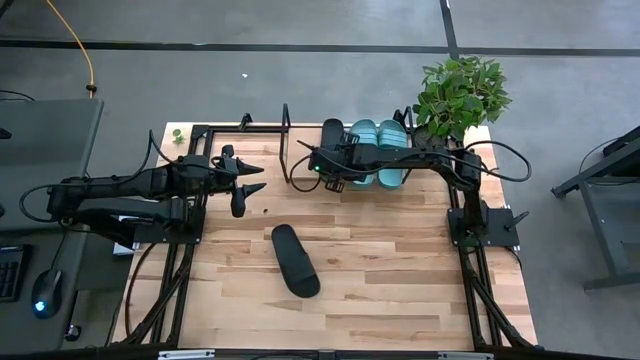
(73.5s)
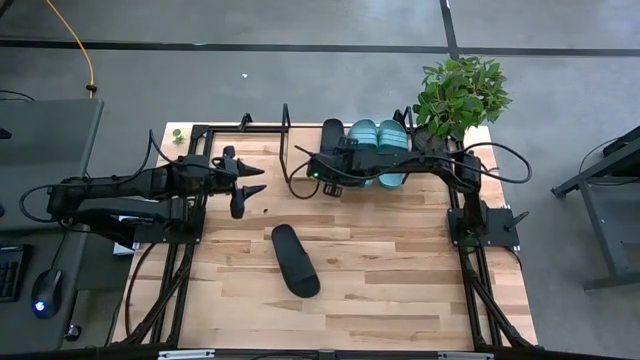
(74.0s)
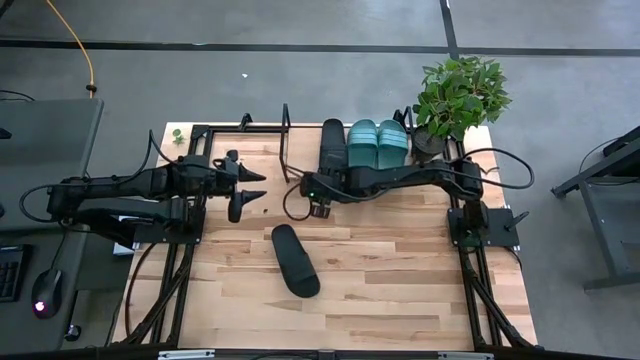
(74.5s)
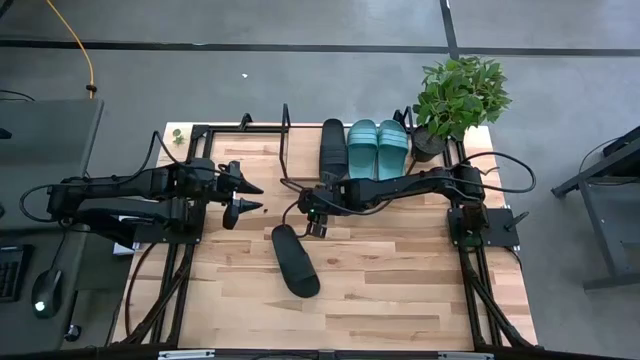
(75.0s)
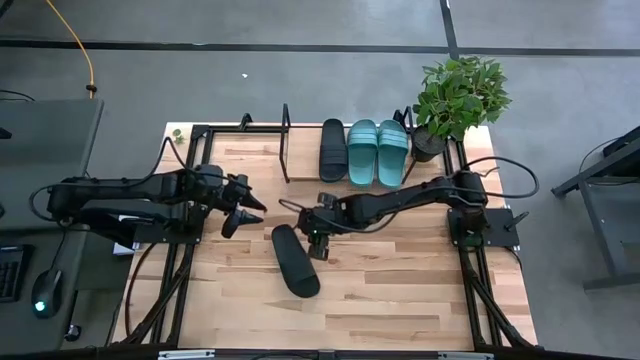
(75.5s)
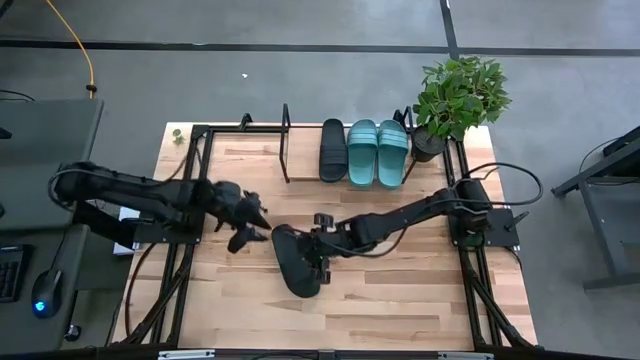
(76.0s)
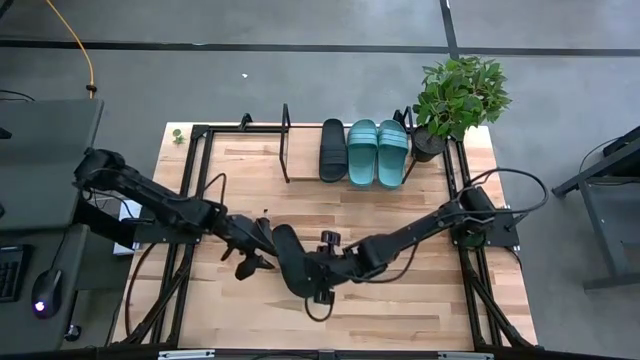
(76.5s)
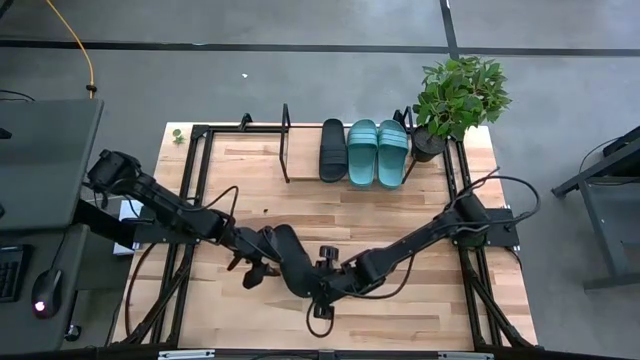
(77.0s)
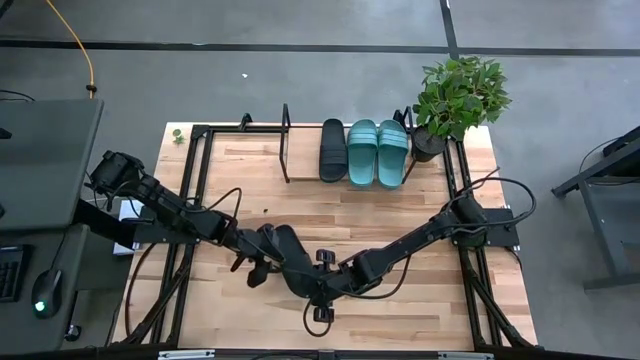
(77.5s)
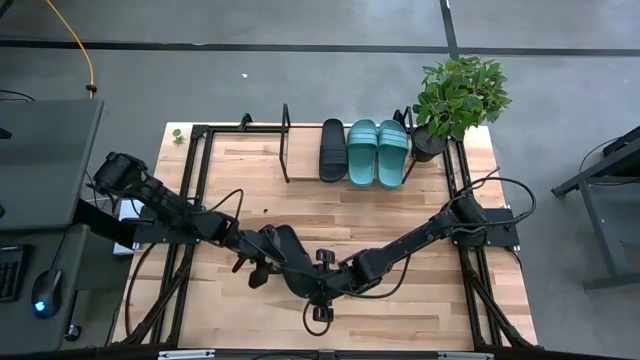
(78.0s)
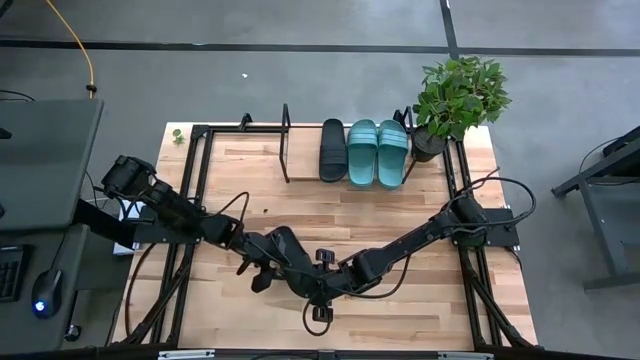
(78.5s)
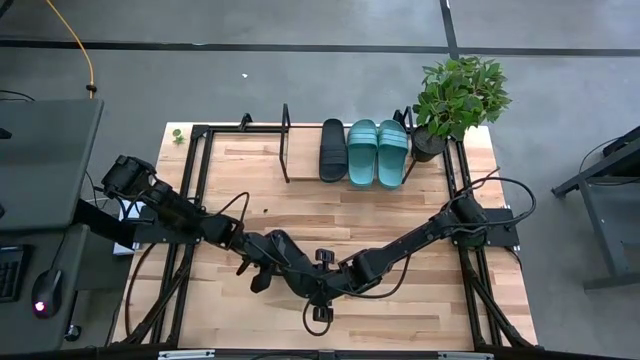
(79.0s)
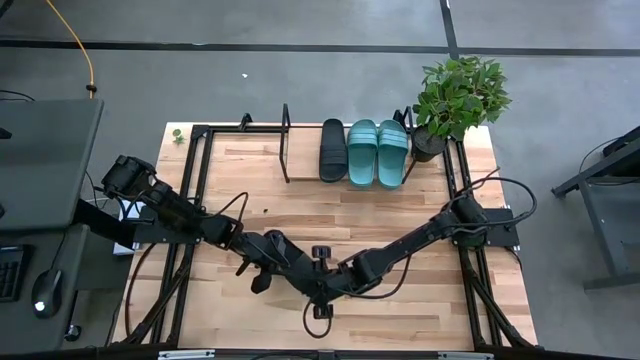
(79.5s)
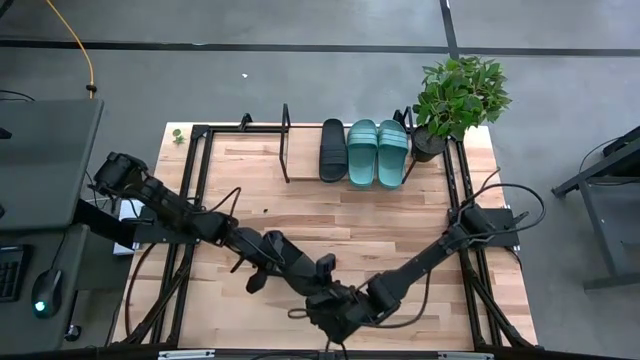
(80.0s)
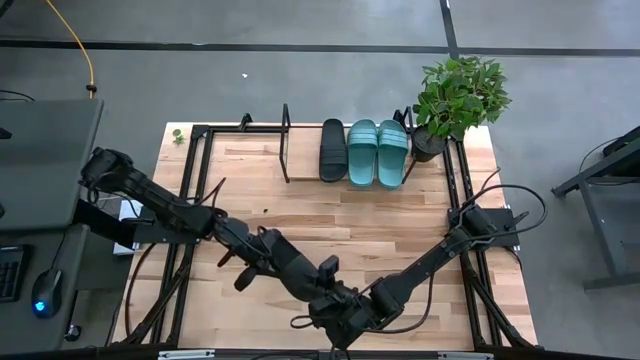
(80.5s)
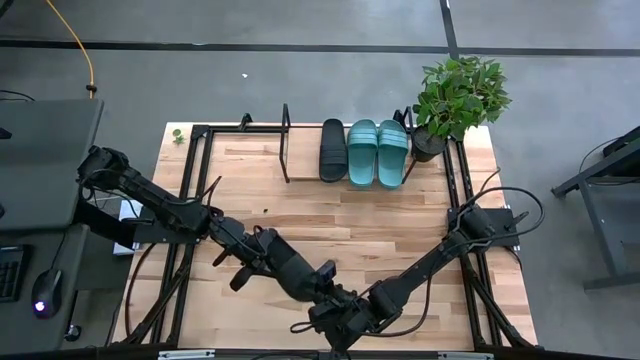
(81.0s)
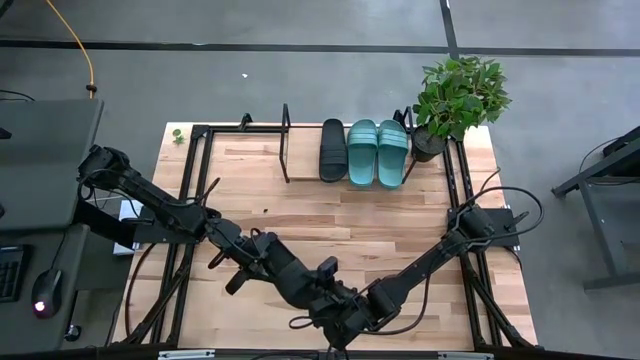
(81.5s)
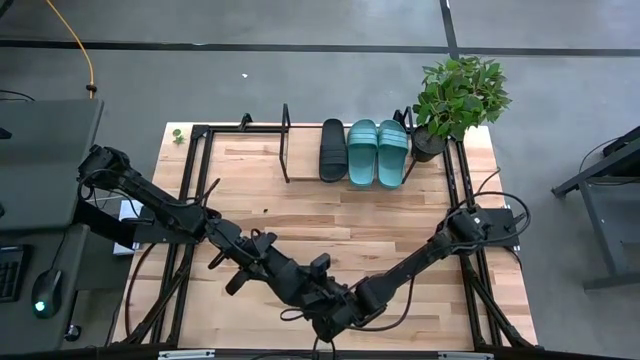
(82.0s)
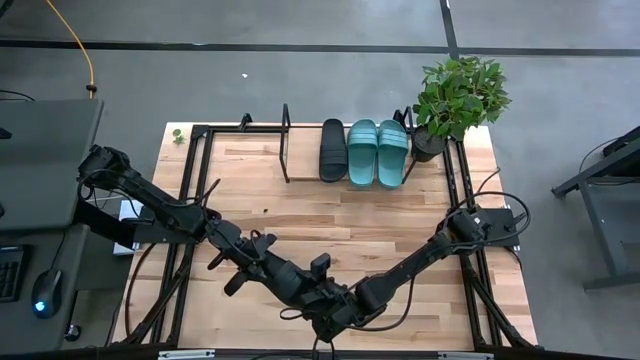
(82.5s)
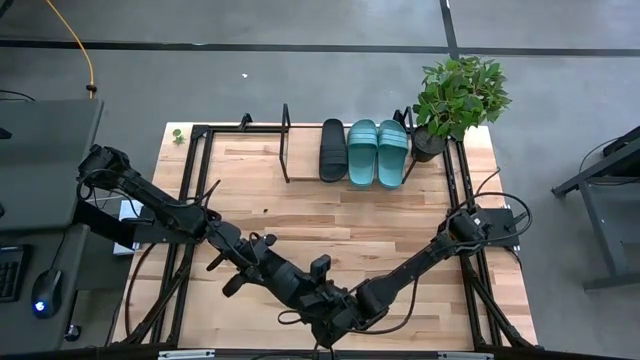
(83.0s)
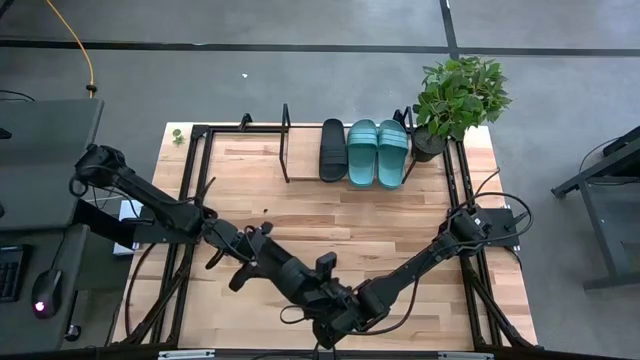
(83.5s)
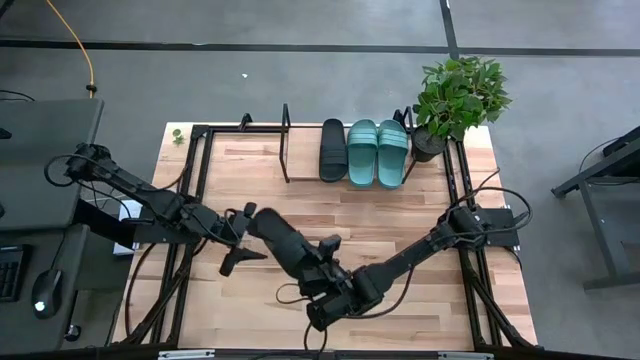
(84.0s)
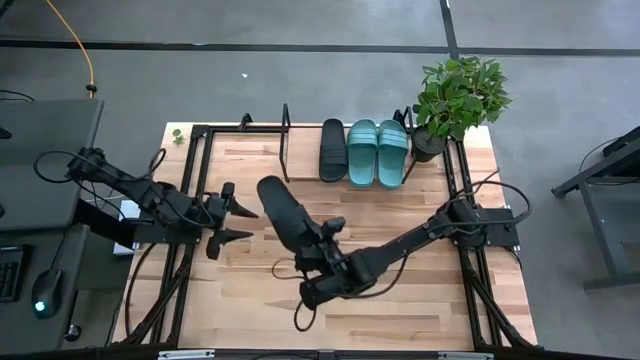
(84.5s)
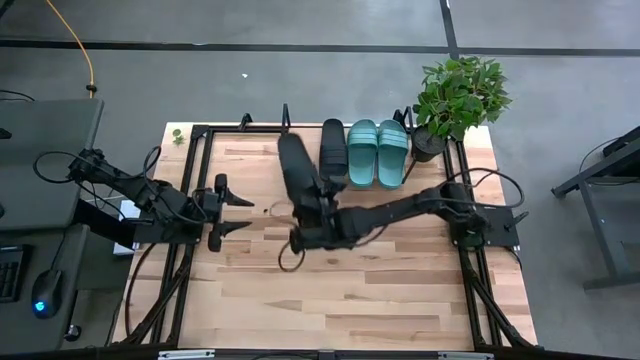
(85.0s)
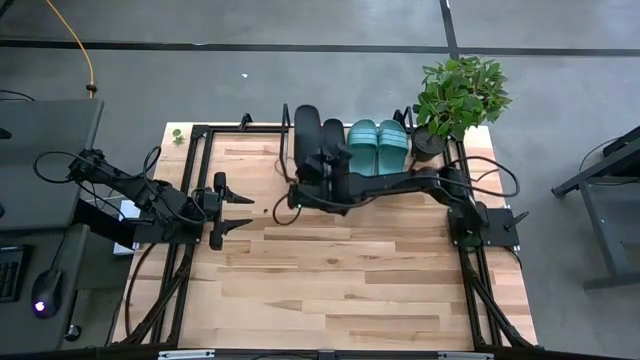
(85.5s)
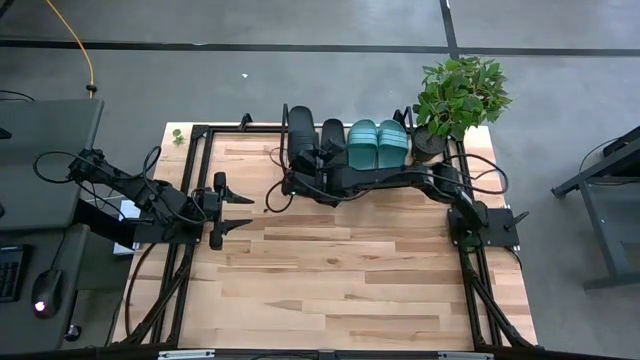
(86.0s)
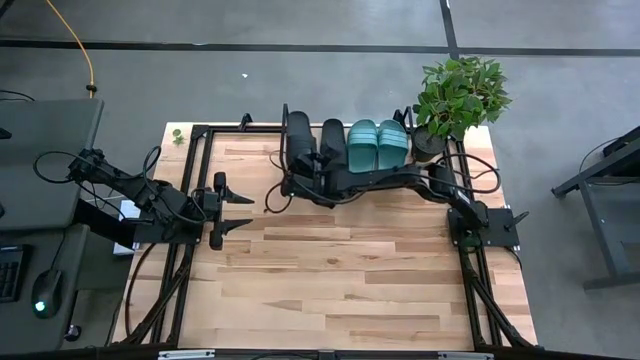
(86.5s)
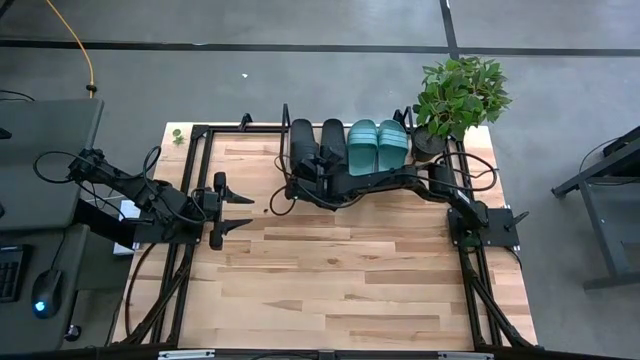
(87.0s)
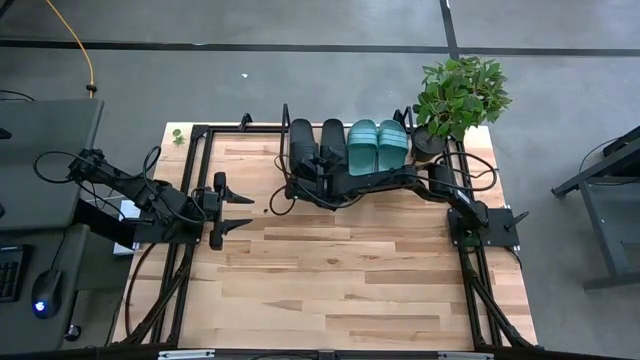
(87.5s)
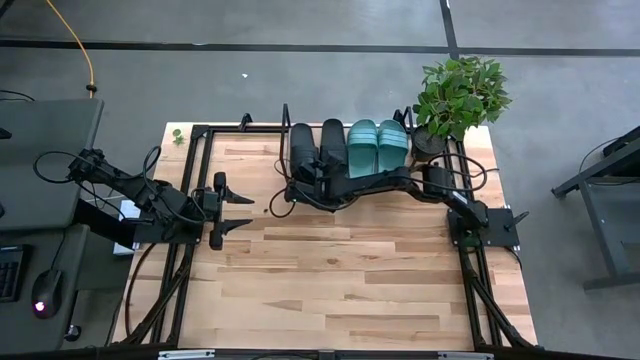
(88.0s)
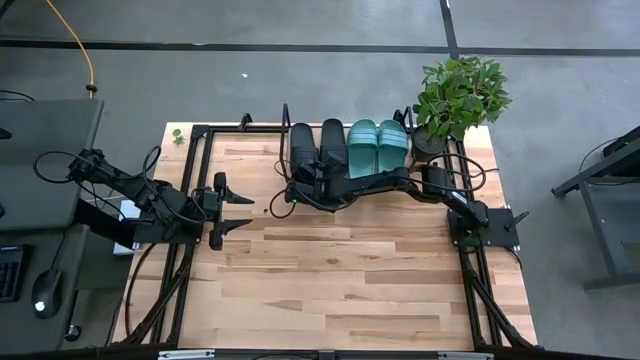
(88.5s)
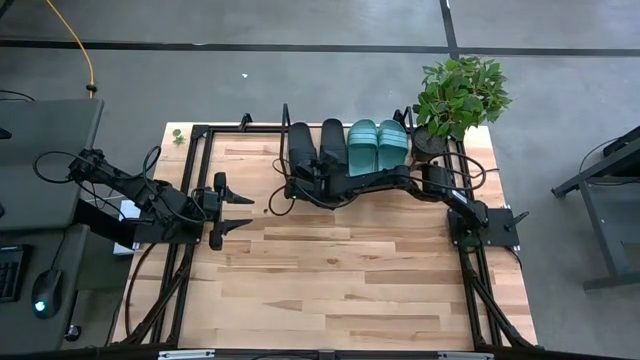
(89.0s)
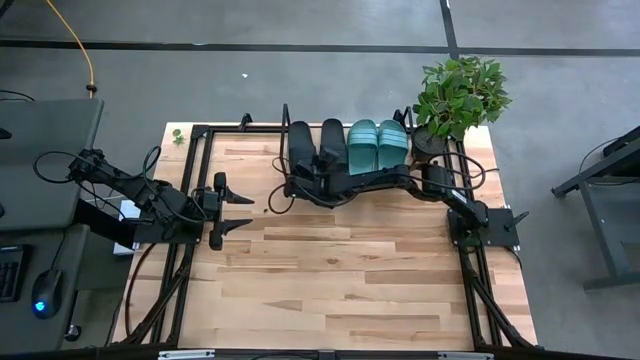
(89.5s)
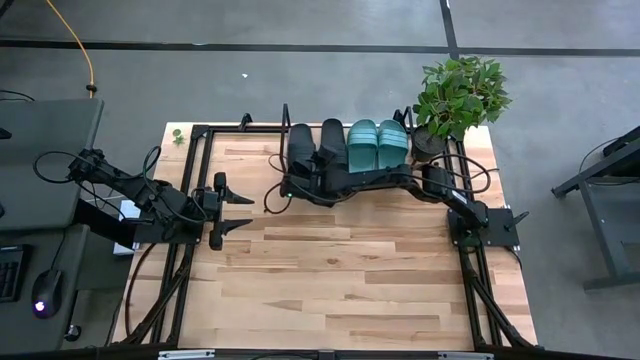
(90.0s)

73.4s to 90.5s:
Task: Pick and place slides into the shelf
Put the black slide on the shelf

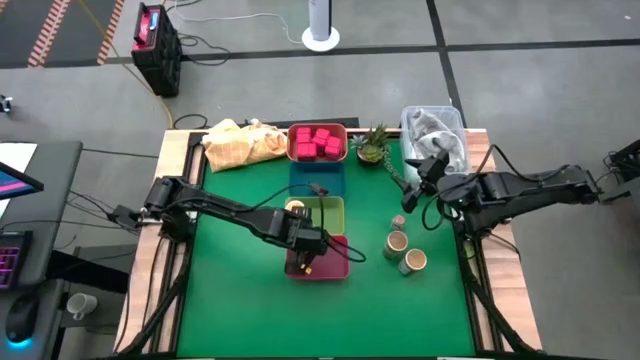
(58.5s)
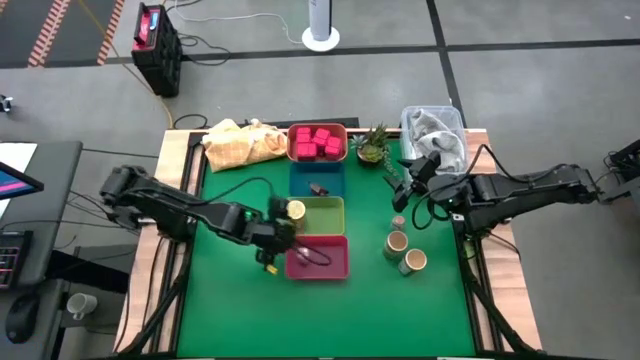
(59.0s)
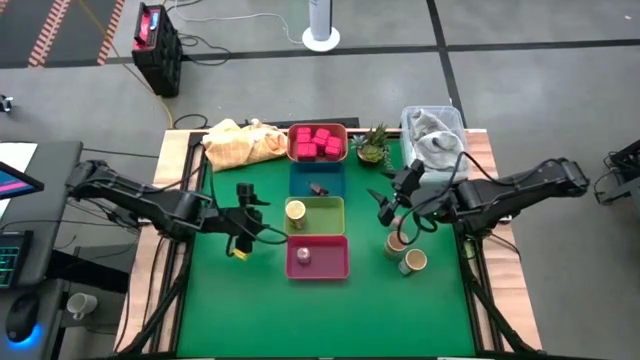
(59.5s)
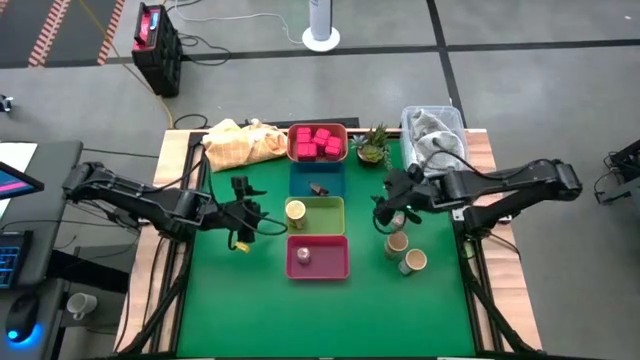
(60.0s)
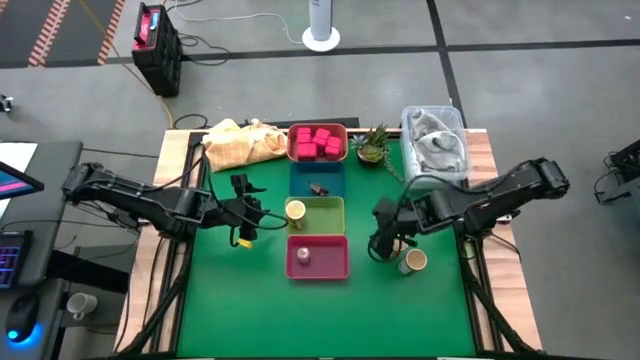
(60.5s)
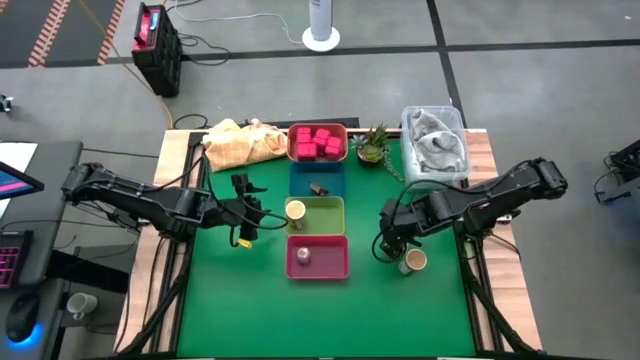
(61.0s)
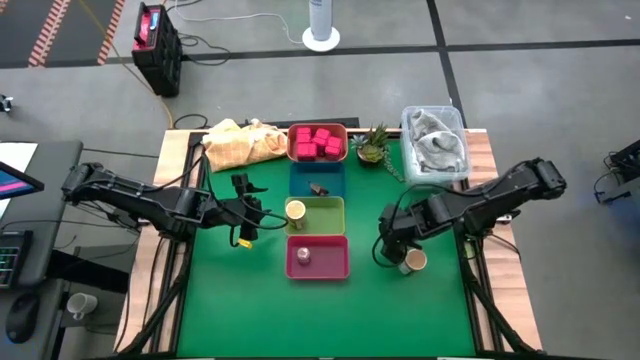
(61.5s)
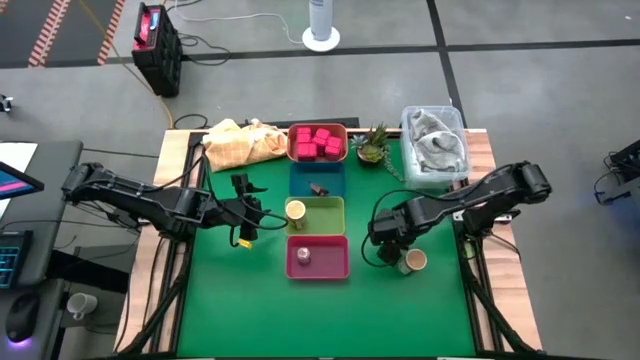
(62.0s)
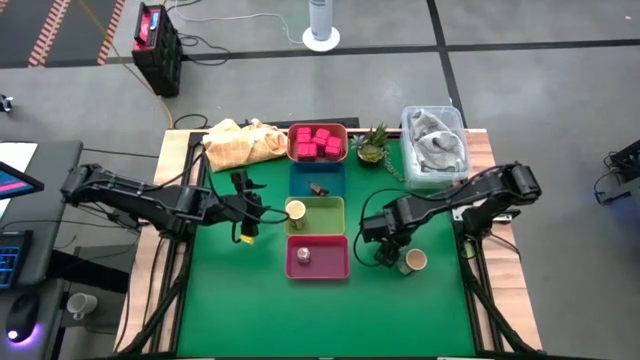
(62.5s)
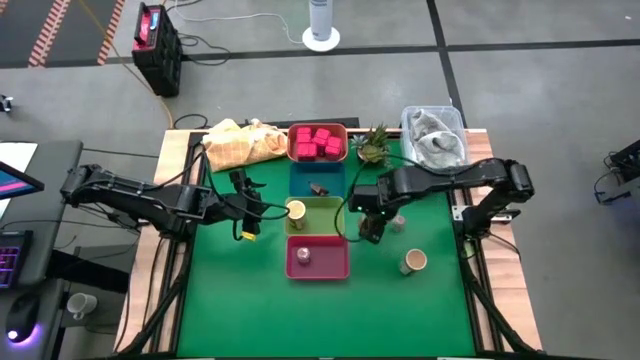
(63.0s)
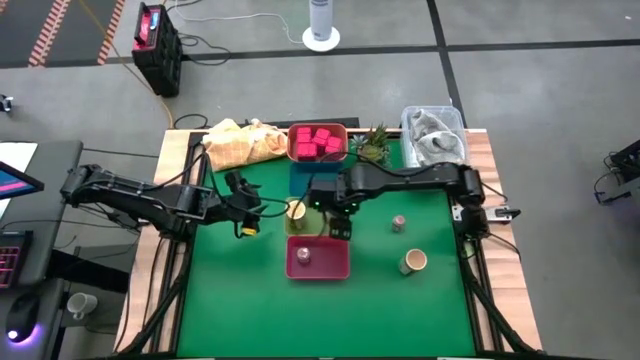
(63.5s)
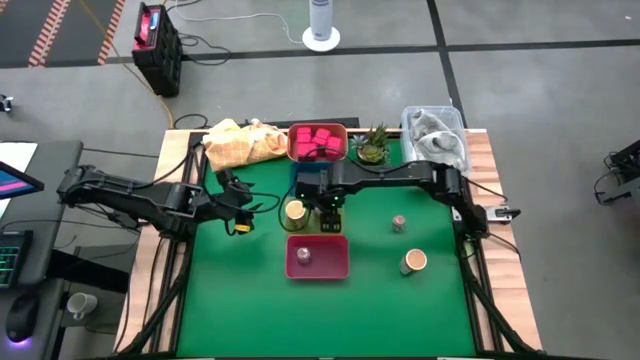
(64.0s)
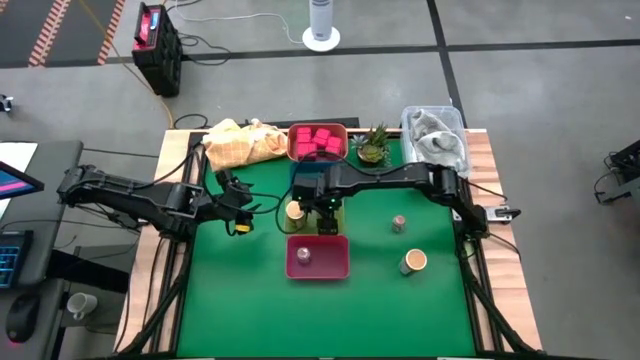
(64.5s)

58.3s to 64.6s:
Task: Sort spices by type
Put the top golden seasoning bottle into the yellow bin
